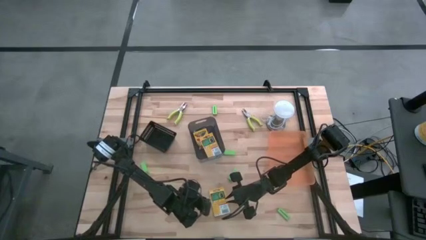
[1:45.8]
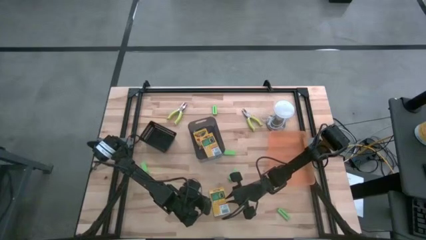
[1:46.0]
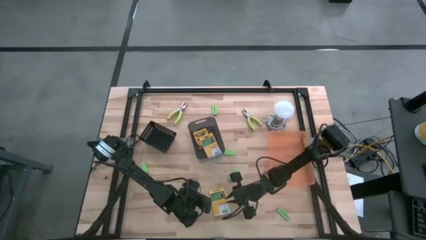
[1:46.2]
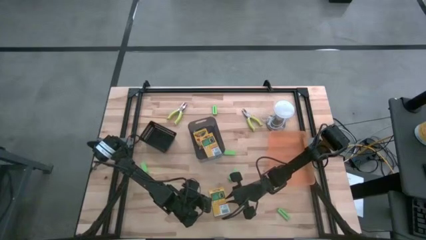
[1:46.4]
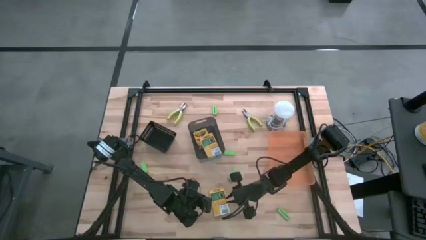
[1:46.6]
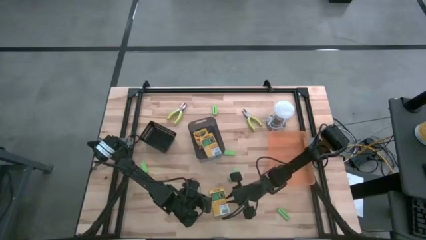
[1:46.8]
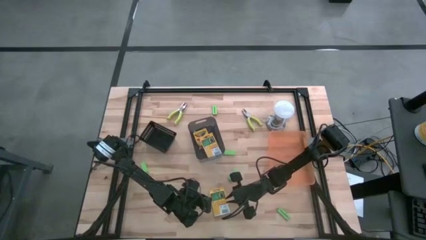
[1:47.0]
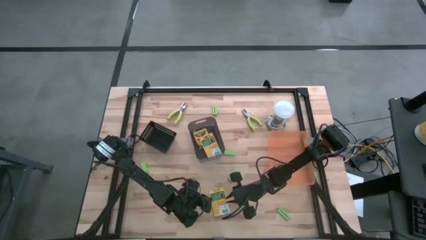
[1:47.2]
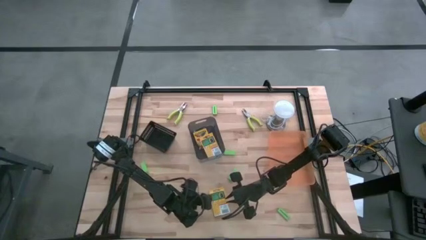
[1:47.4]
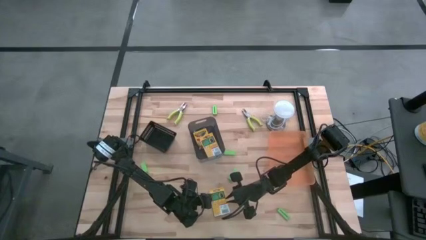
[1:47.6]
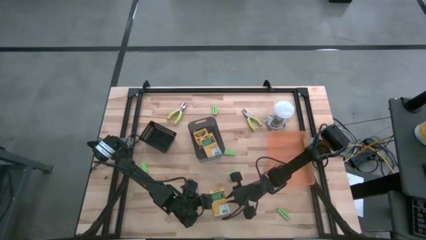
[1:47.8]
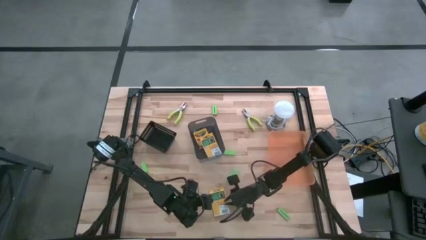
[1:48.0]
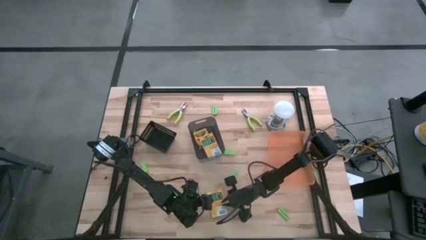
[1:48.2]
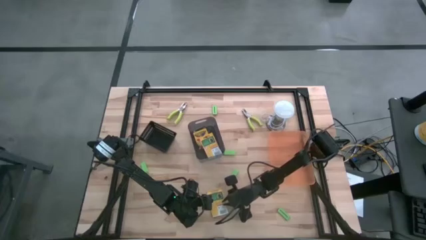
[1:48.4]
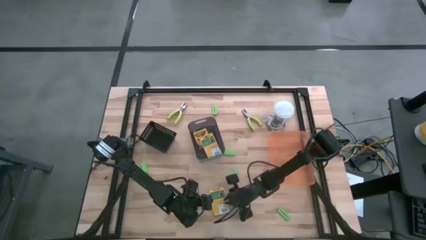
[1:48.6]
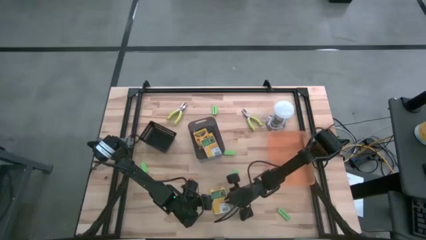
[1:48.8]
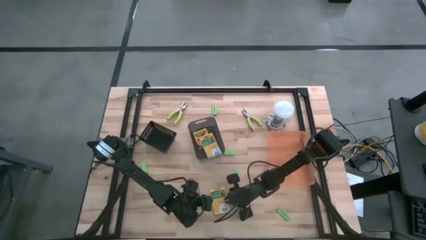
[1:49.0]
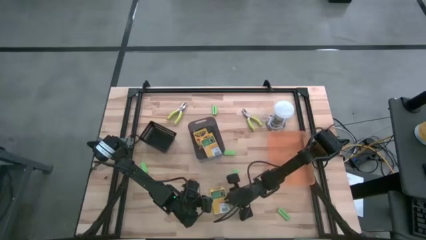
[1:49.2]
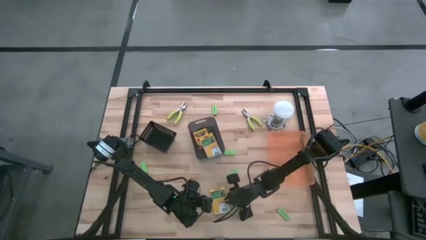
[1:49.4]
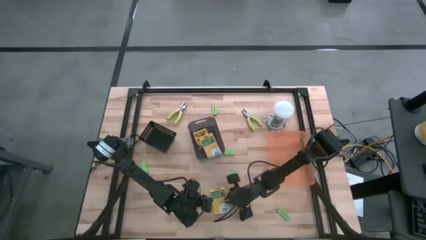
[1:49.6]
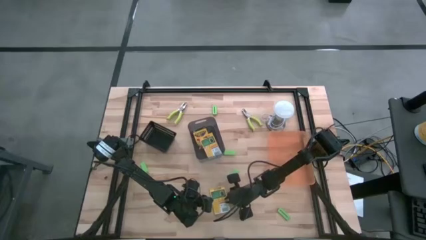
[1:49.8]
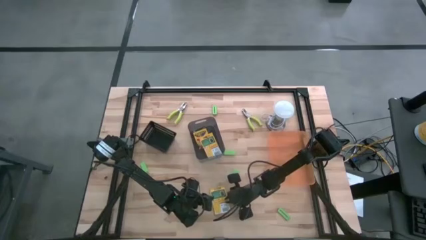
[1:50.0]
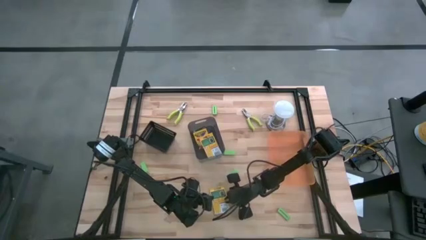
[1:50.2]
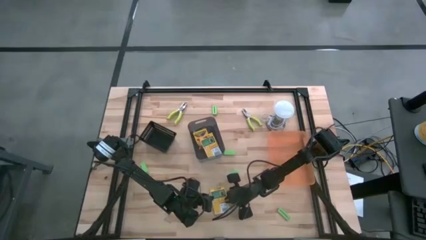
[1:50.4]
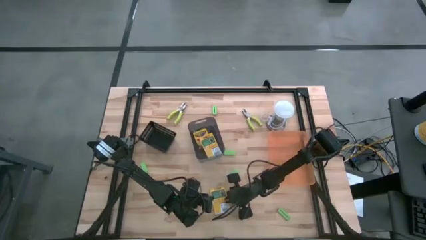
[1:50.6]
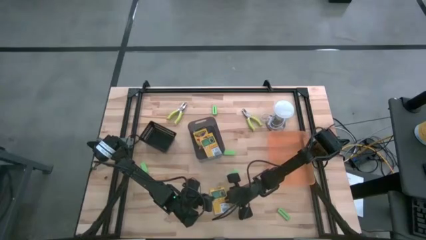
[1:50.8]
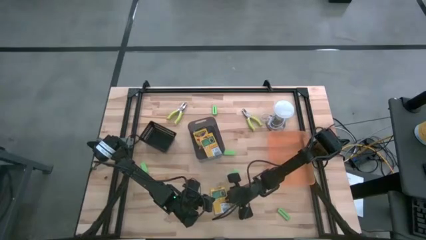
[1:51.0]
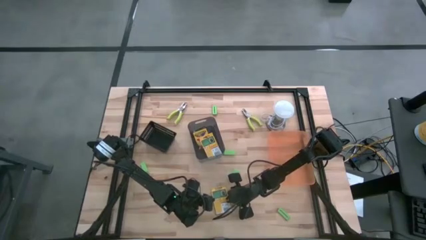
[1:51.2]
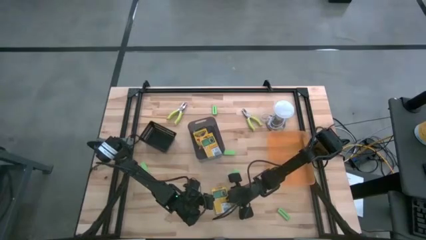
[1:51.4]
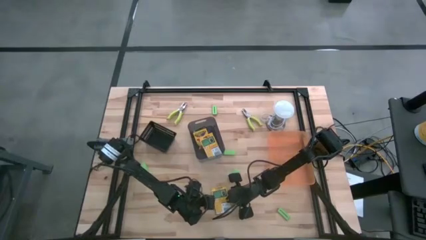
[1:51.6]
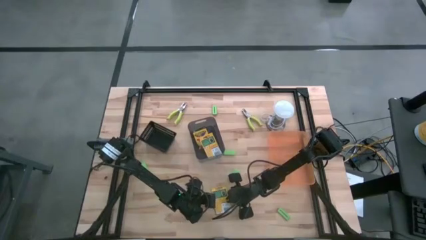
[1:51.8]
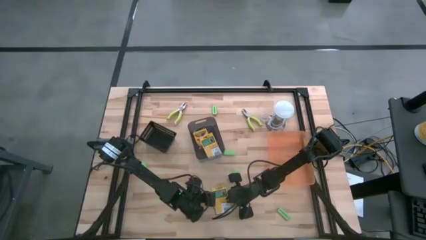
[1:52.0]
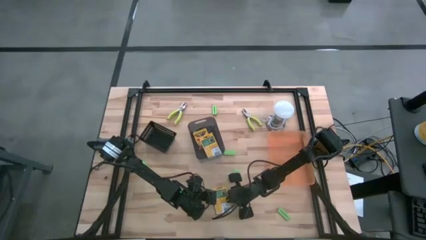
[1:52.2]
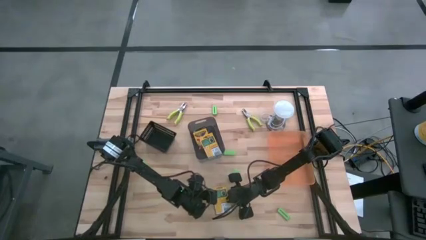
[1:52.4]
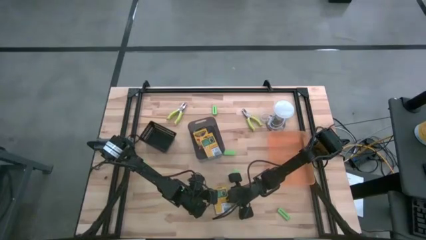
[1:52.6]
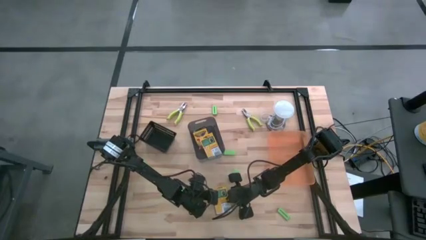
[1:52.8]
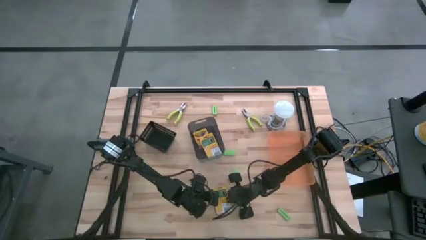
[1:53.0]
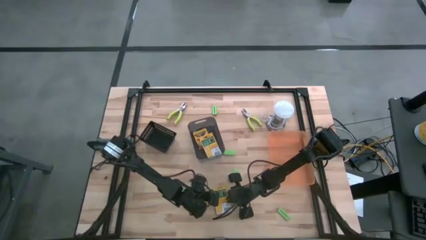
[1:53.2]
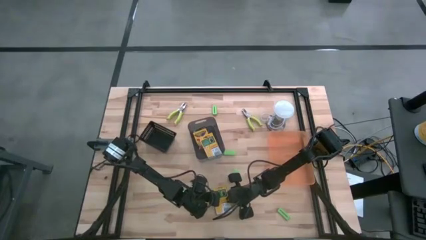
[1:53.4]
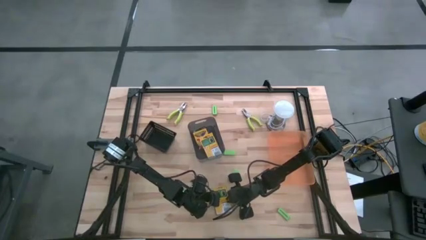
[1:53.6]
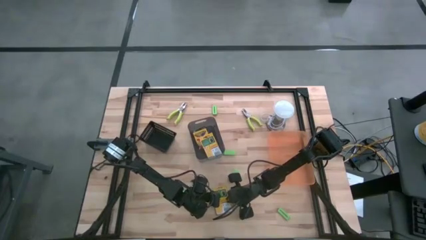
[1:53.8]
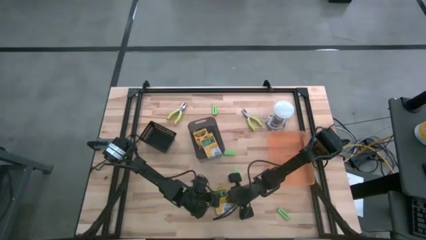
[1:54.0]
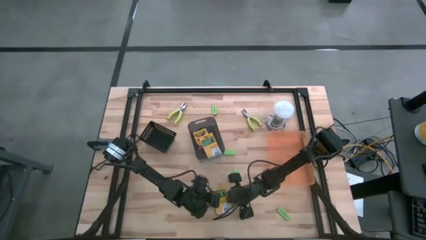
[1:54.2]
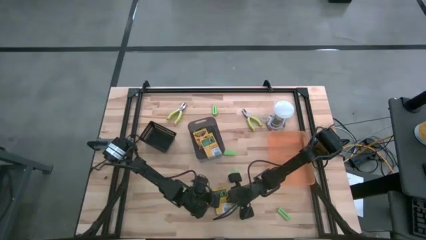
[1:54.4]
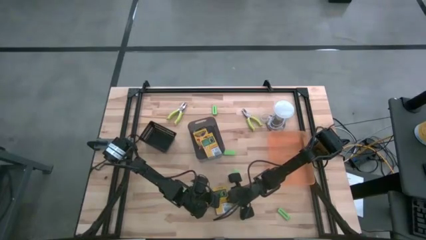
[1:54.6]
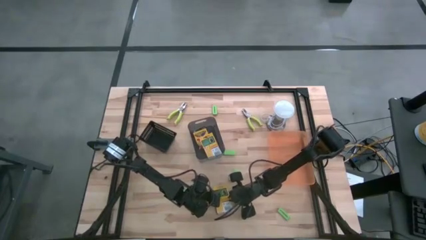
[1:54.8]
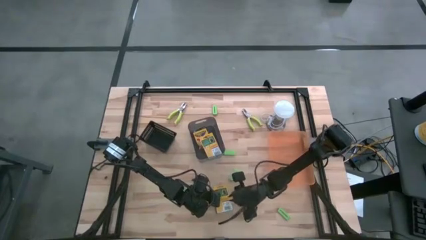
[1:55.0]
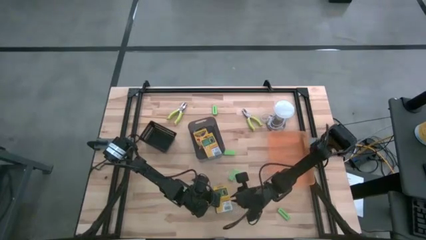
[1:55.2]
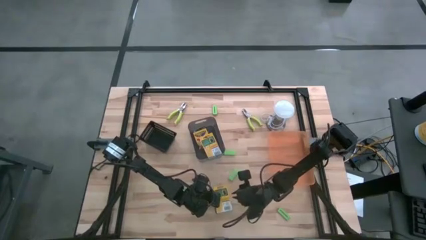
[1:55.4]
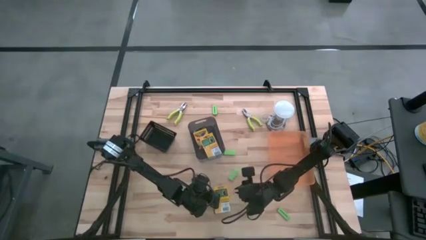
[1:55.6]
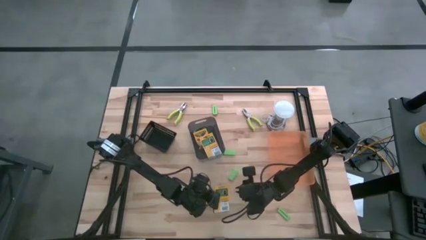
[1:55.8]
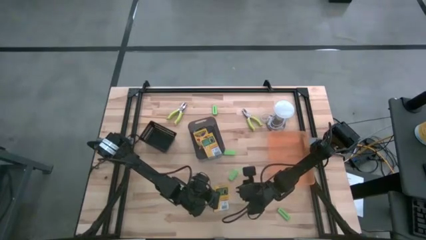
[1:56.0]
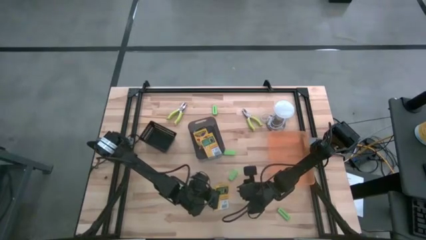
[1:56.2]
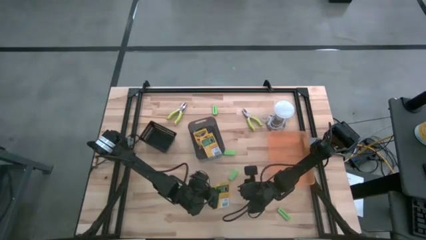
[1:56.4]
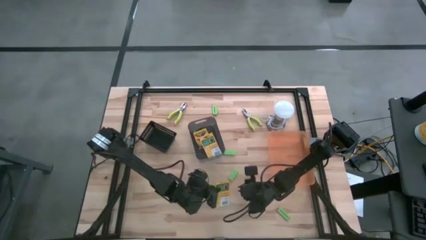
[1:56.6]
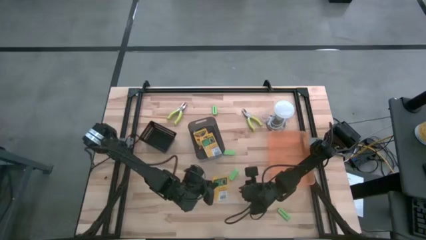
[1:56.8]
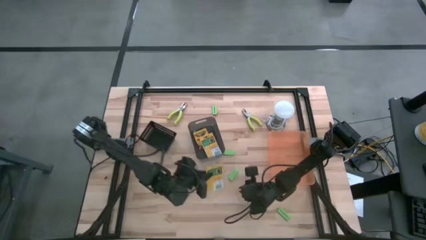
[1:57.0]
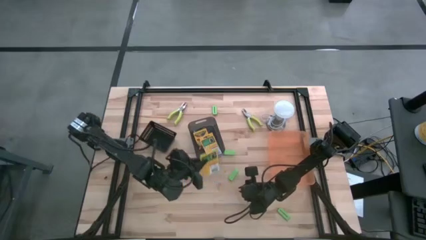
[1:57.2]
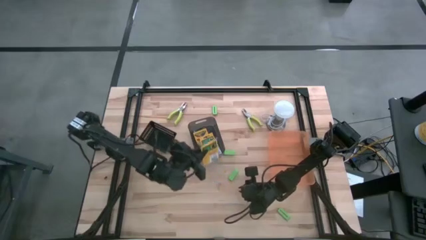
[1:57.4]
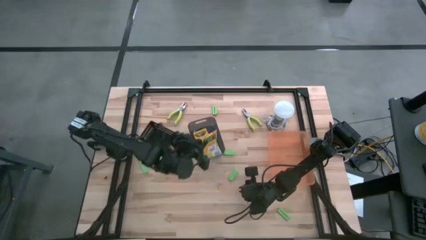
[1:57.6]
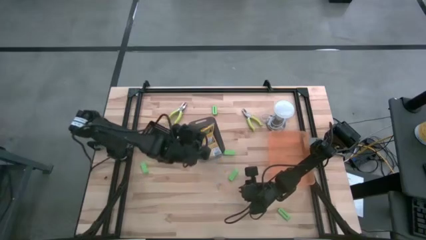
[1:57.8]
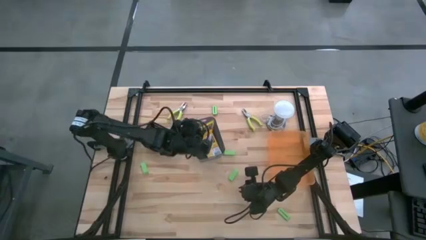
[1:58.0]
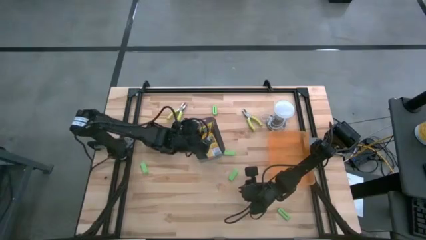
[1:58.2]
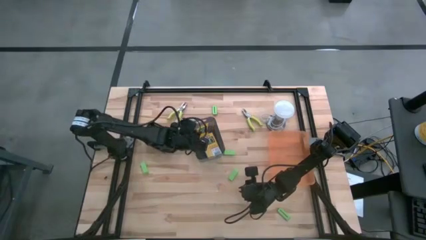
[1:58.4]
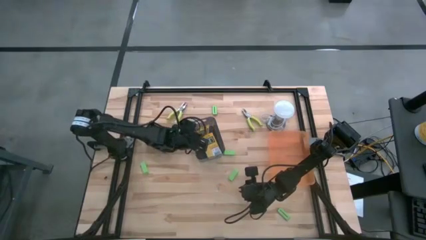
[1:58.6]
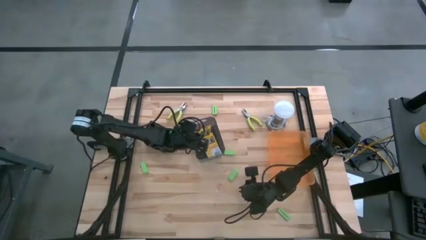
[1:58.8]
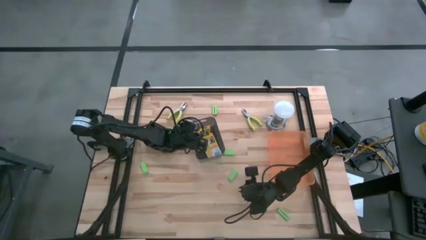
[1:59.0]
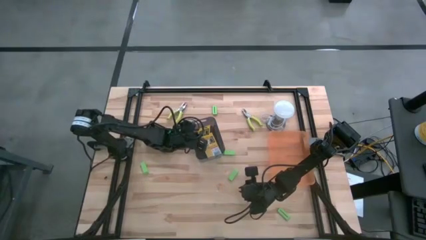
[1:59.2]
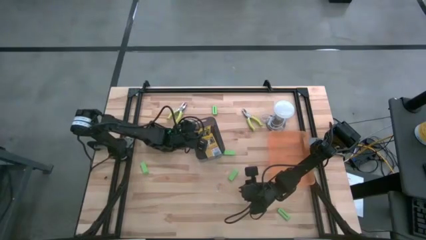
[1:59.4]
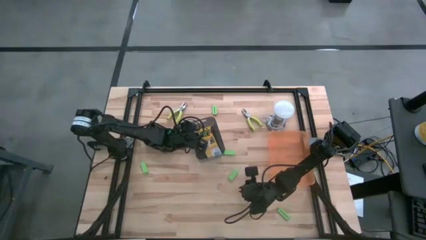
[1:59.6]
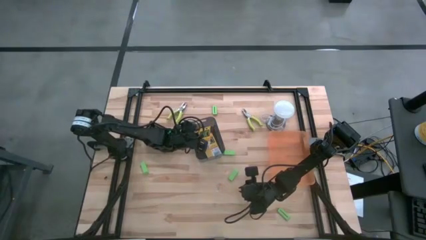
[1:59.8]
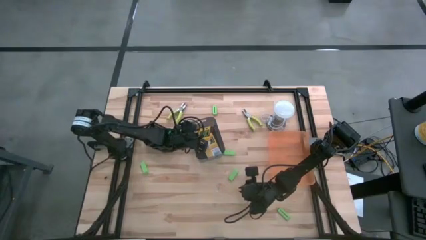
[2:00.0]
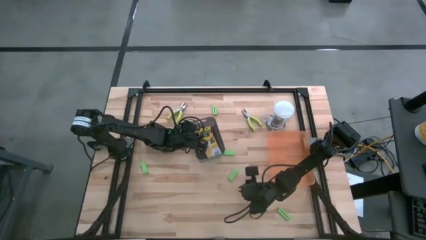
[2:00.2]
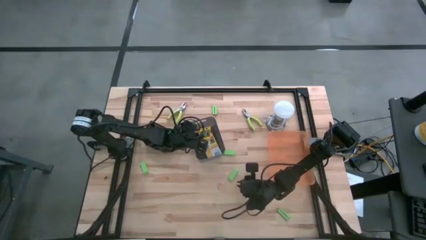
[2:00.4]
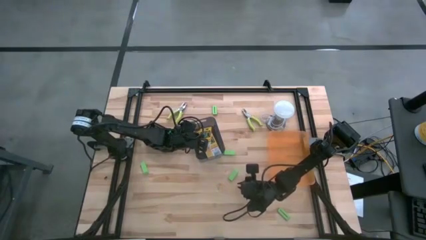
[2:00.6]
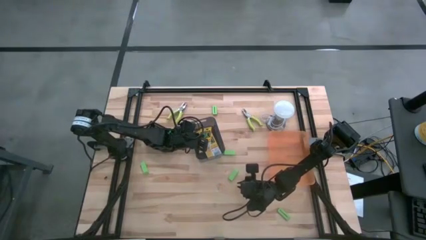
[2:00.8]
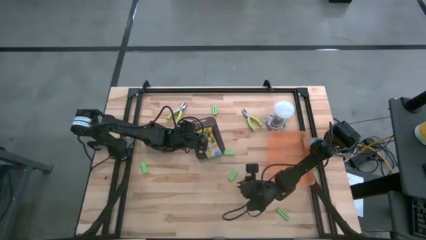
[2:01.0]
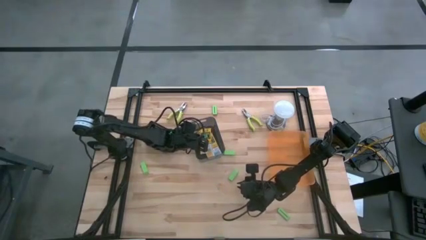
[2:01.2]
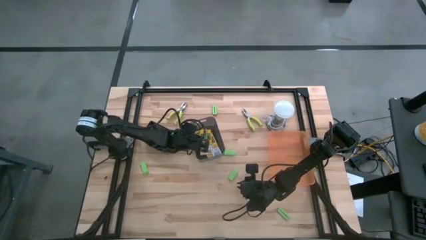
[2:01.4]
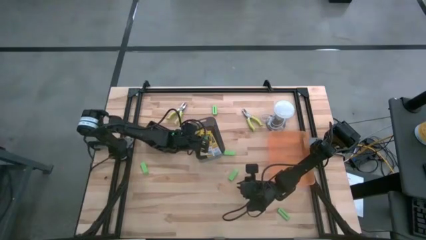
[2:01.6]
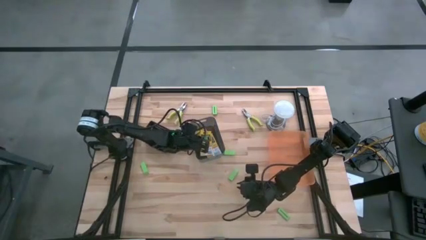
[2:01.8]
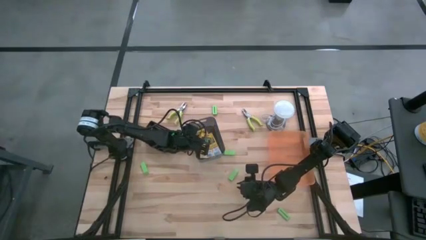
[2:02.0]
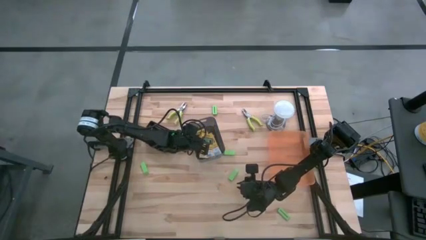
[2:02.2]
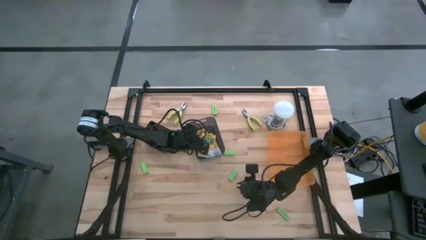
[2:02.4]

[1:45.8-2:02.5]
Task: Pick & Place School Supplies
Put the yellow crayon box into the black transparent bin
